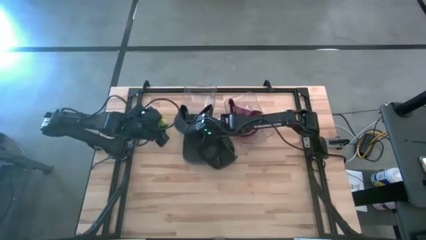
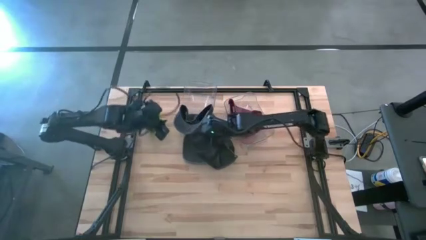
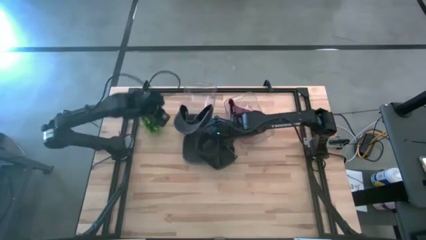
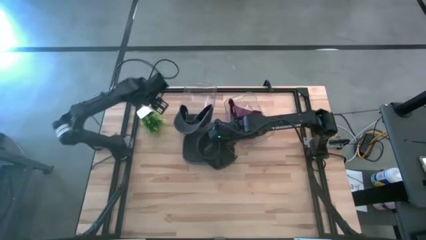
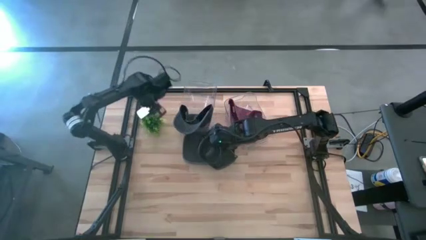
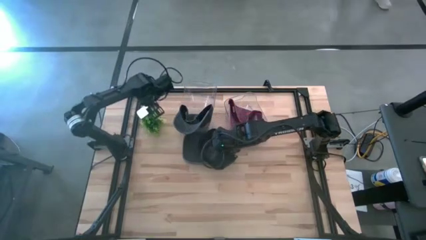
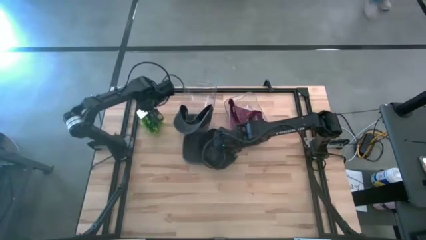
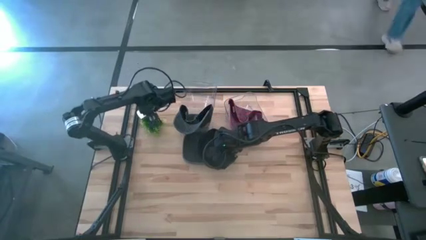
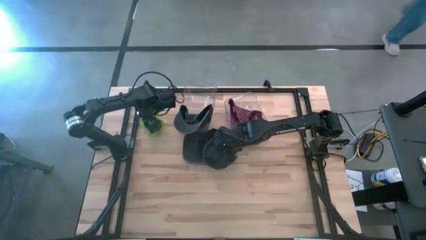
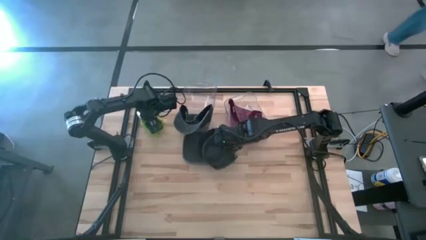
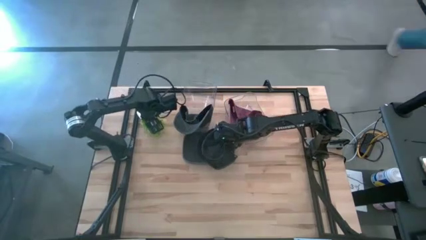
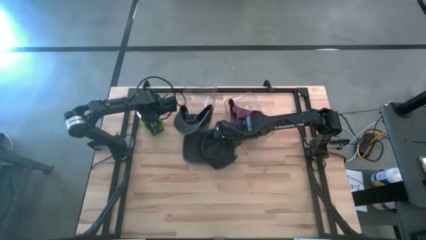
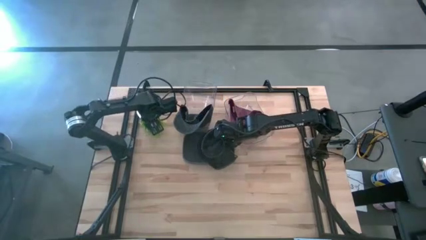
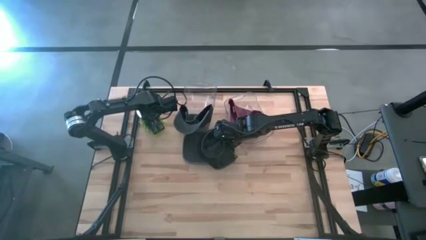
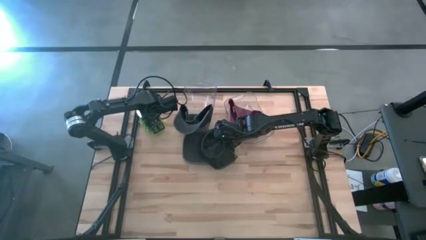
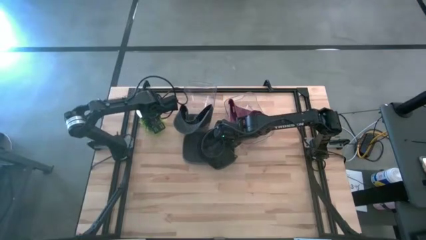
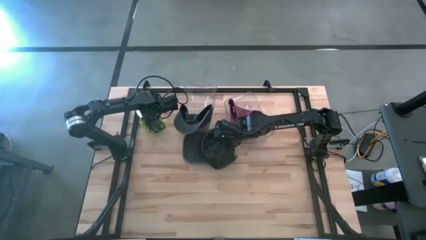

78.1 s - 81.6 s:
Task: Pick & Place hat
Adjust the plant pot on the table

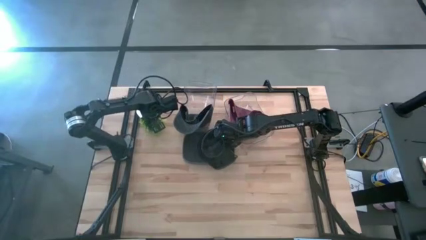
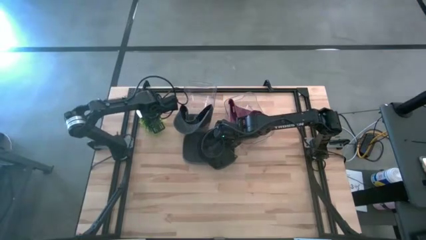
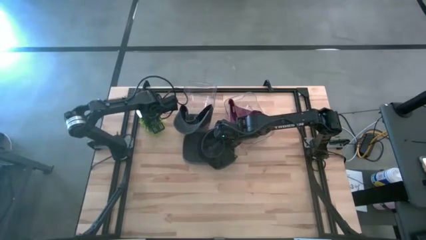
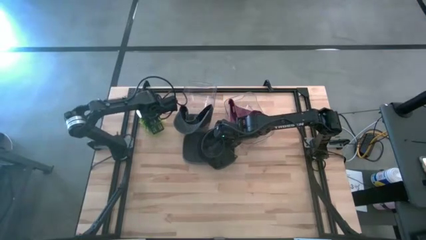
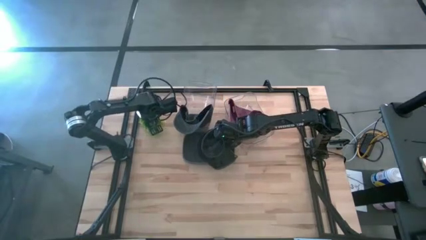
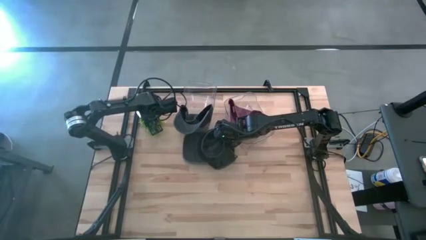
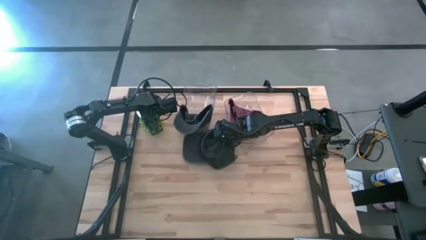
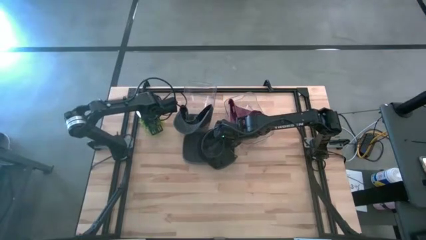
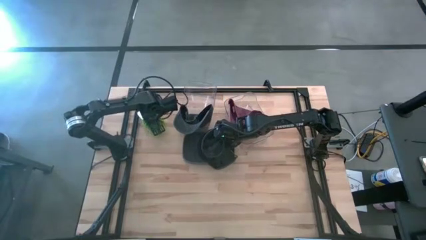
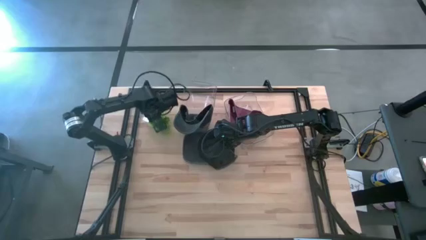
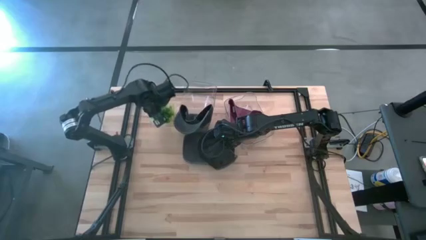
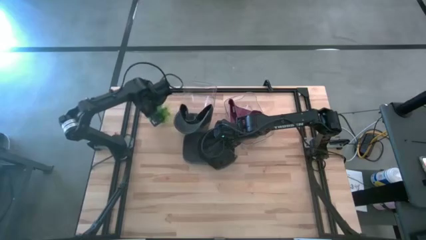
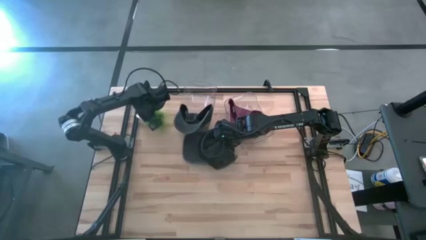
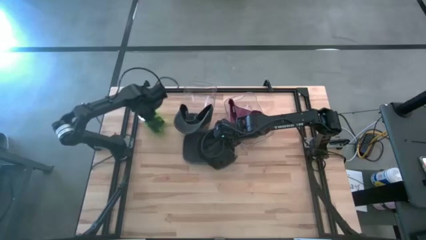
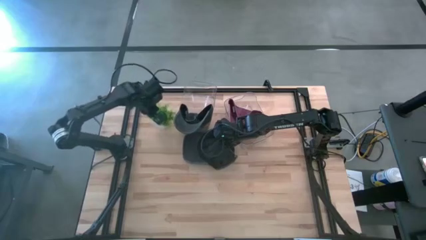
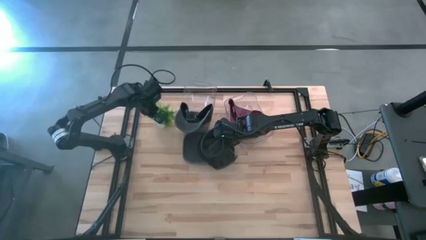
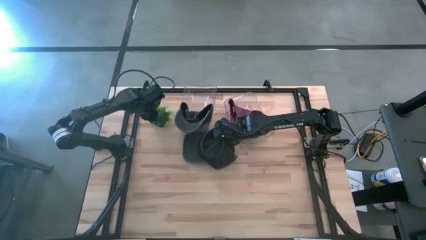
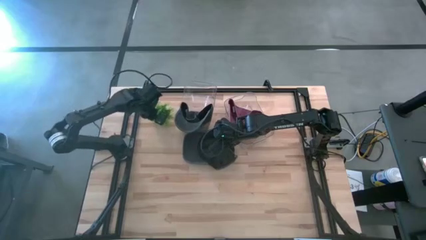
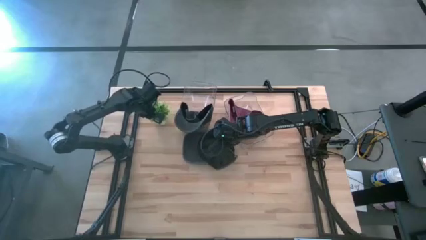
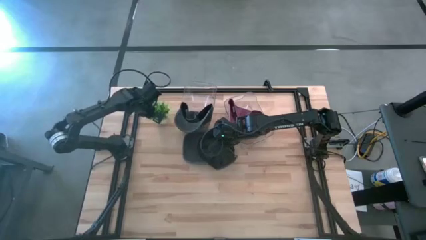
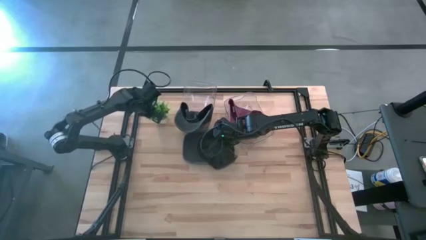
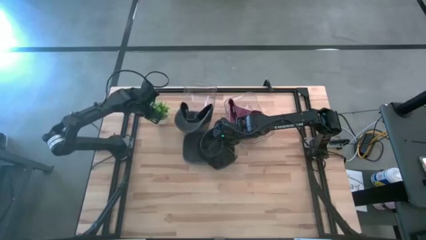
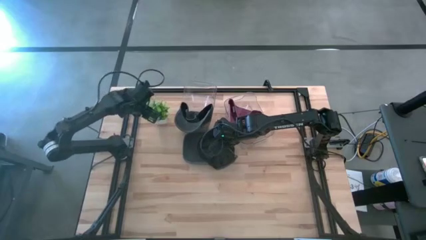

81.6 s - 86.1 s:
Adjust the plant pot on the table

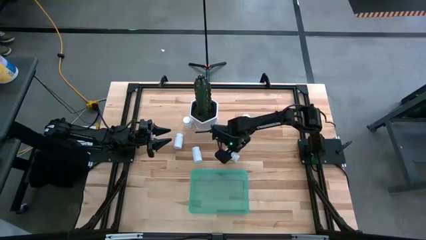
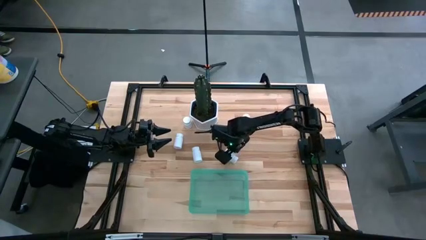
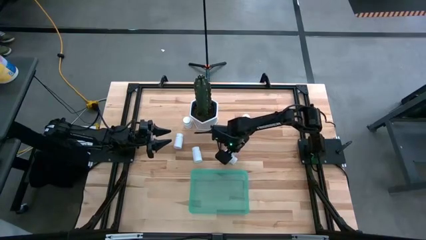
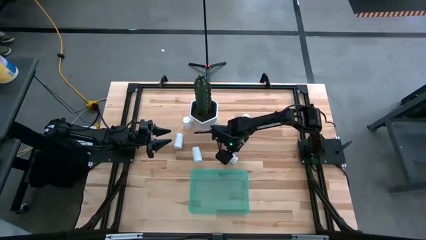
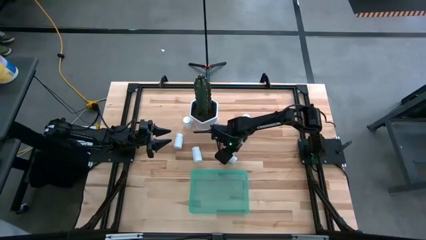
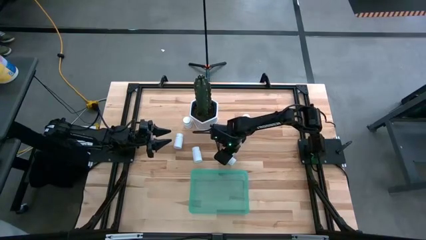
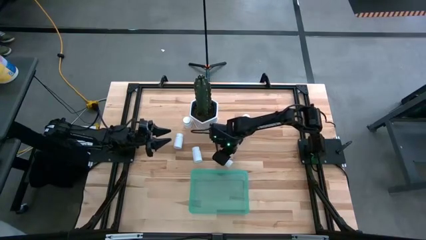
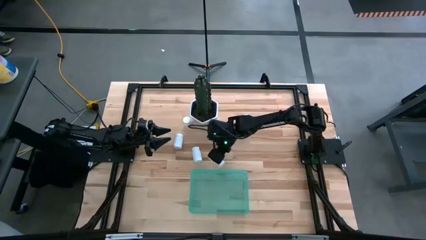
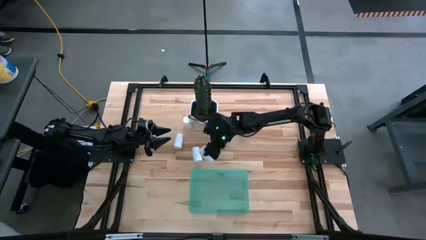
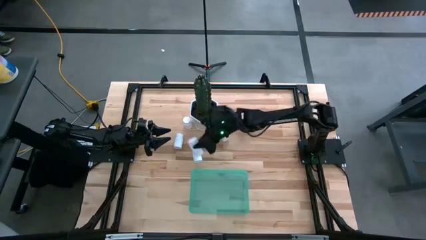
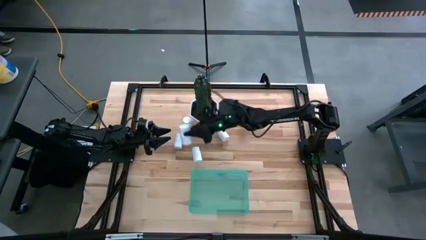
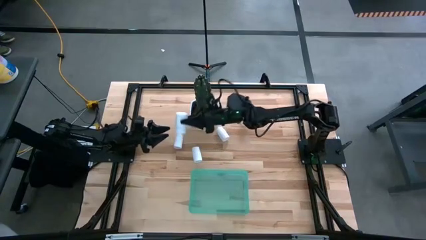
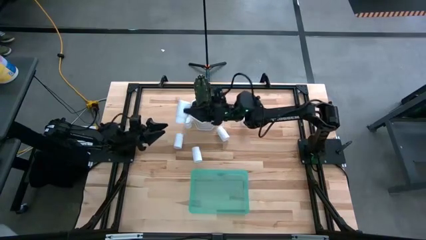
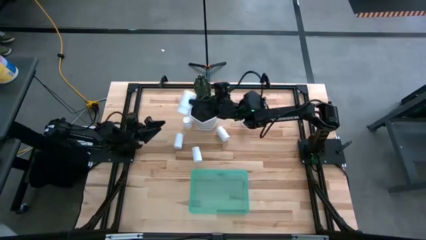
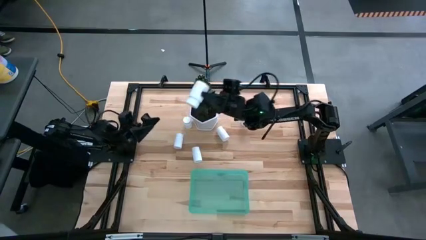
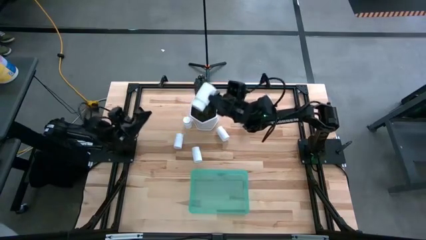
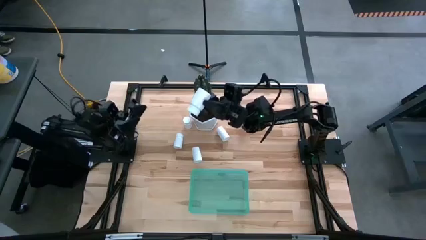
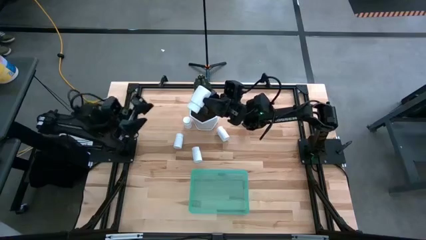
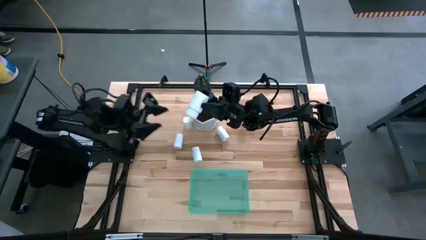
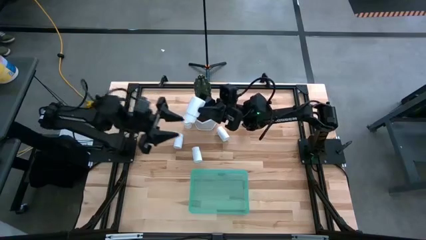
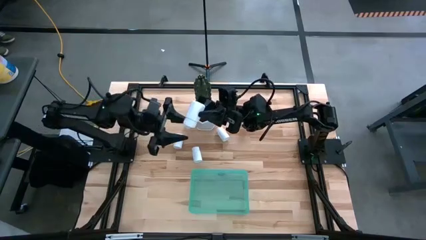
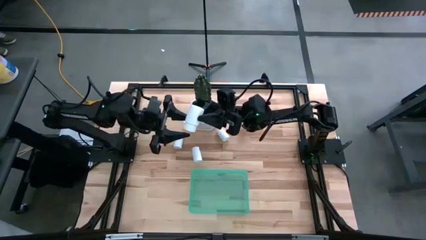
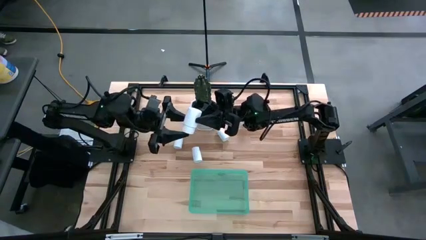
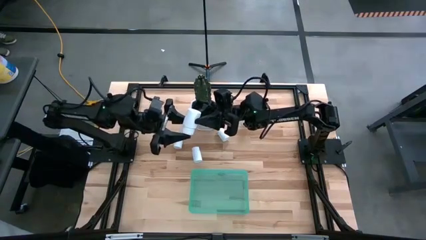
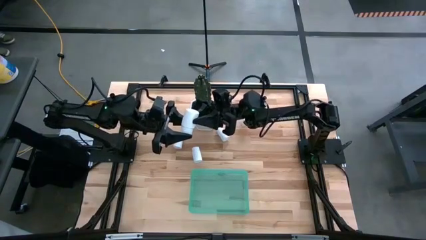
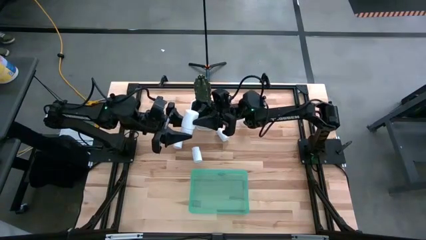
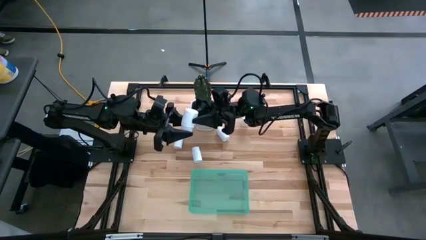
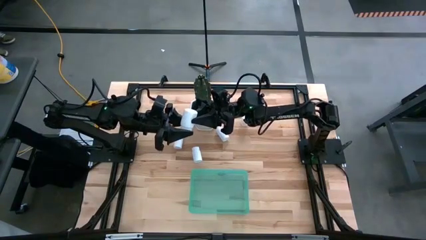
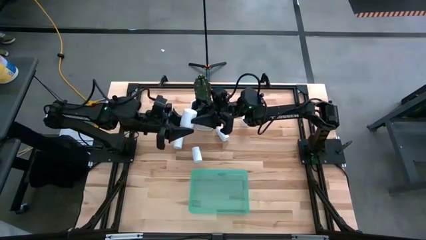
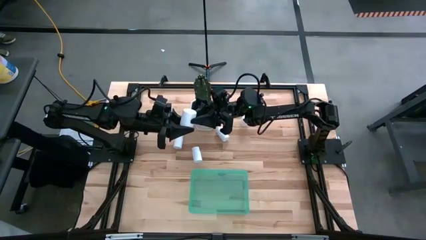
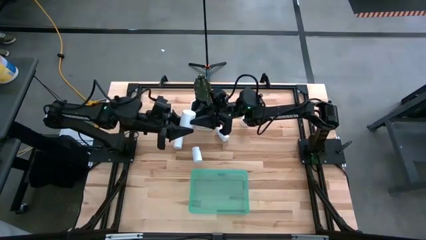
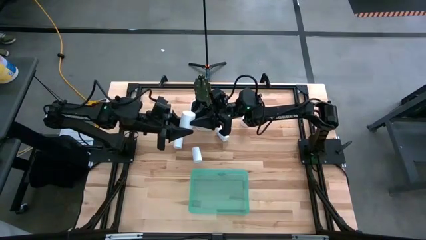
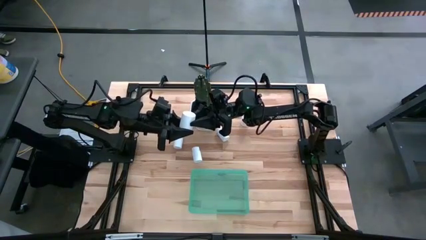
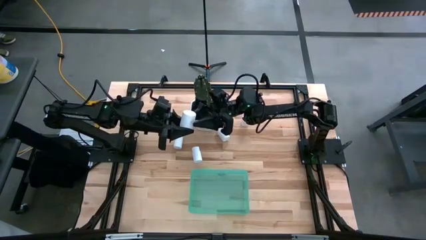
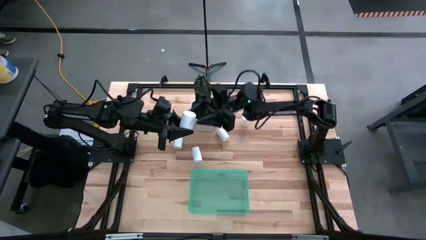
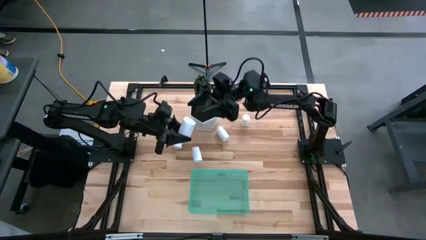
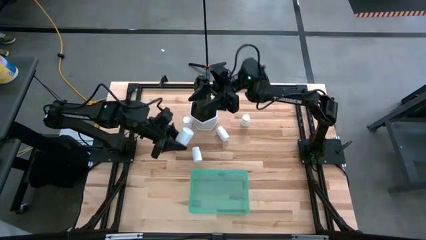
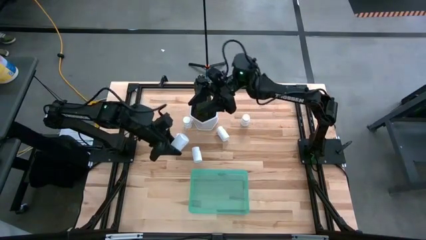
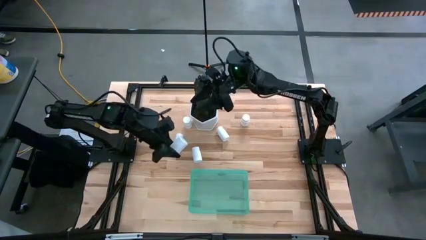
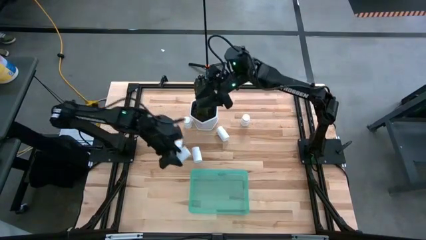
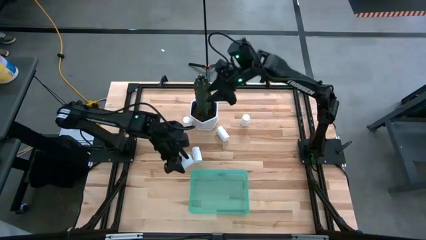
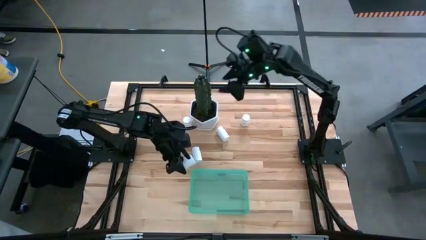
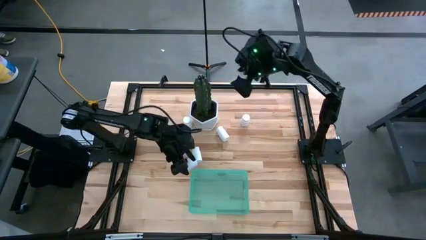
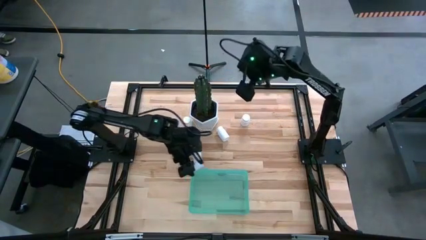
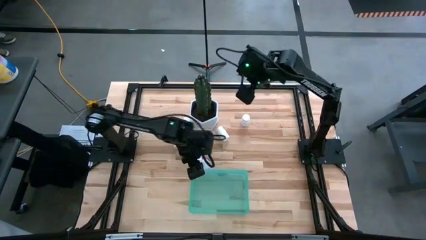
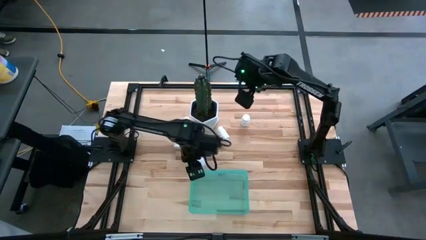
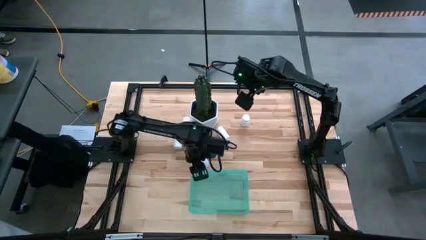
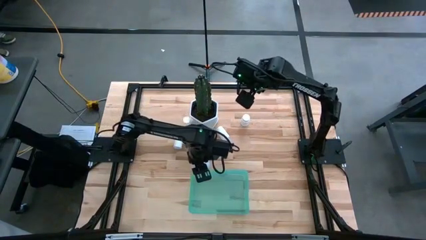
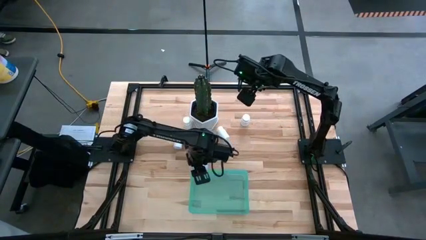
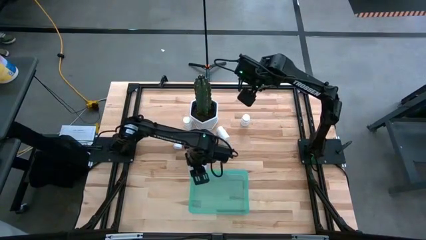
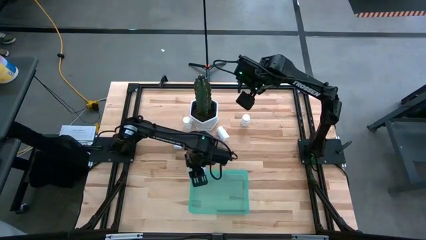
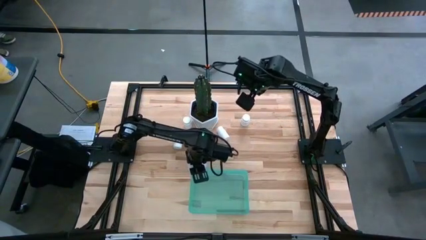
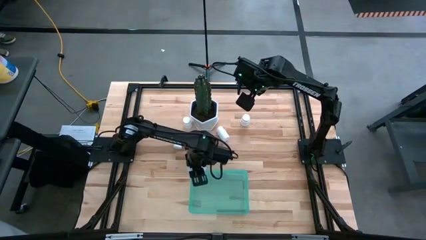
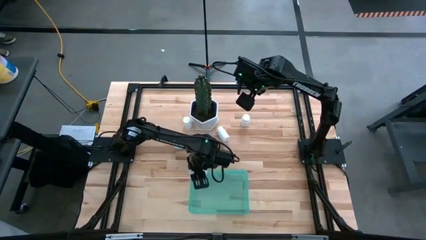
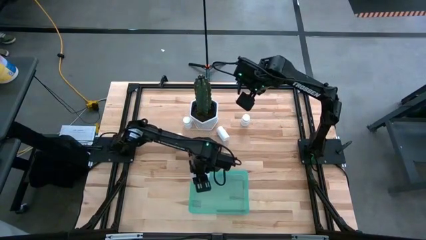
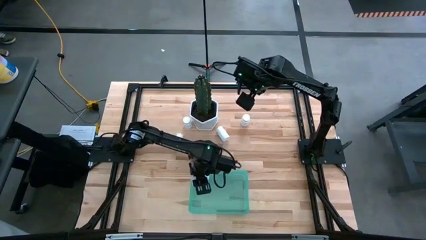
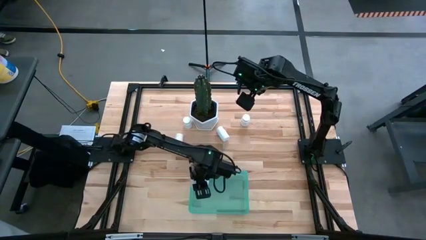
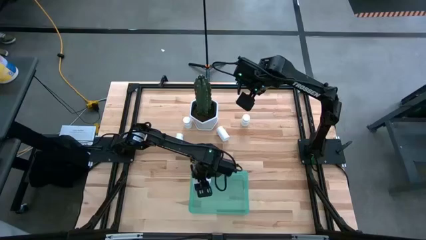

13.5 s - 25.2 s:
Task: Pick and place pill bottles into a basket
Put the white pill bottle into the green bin
